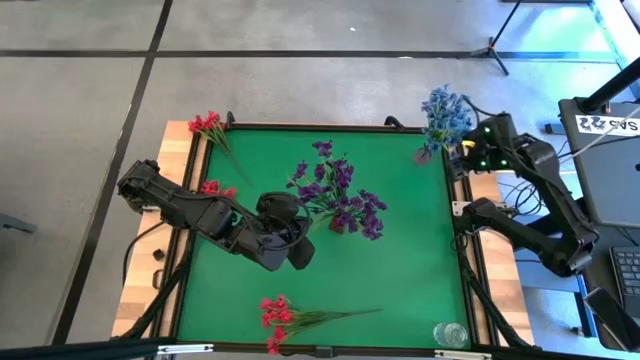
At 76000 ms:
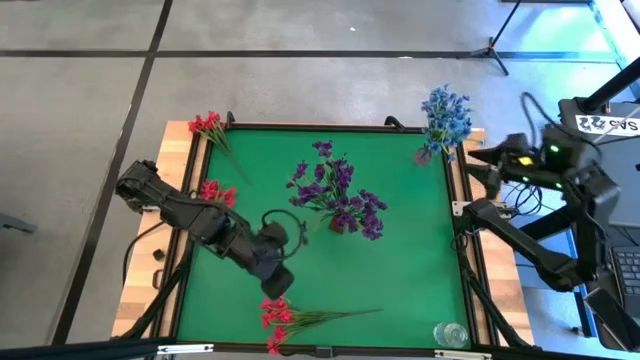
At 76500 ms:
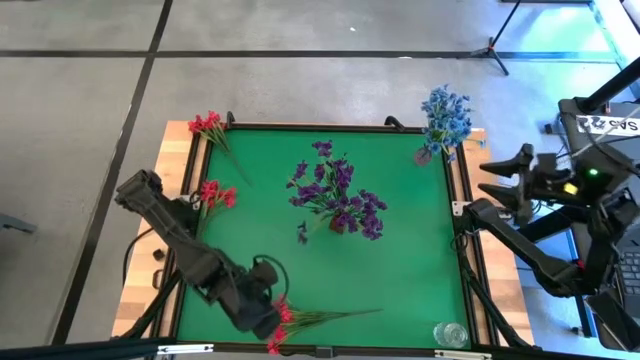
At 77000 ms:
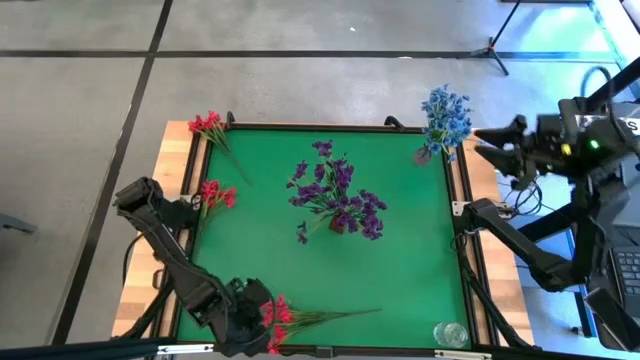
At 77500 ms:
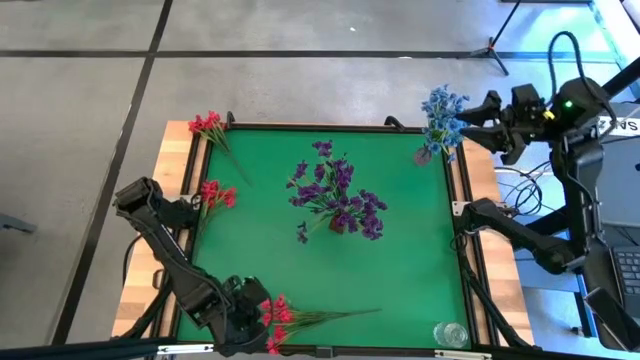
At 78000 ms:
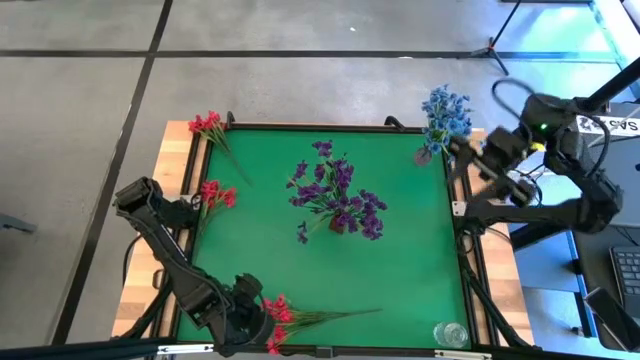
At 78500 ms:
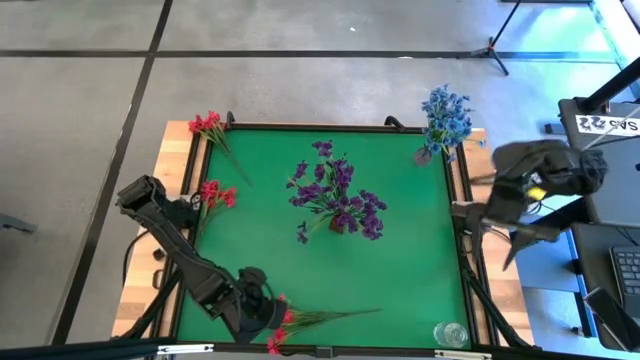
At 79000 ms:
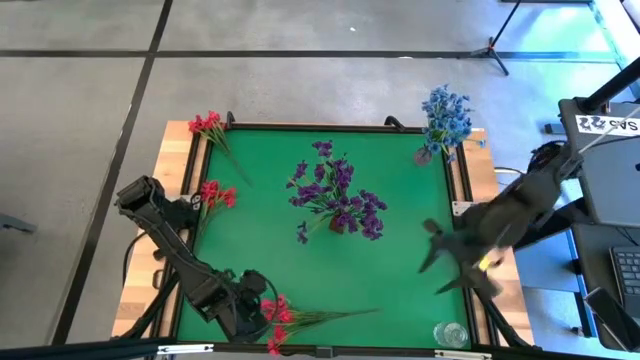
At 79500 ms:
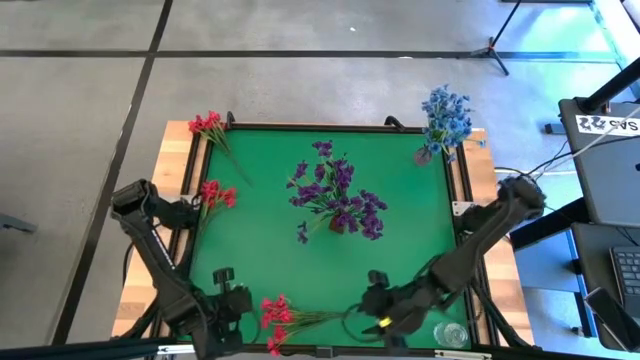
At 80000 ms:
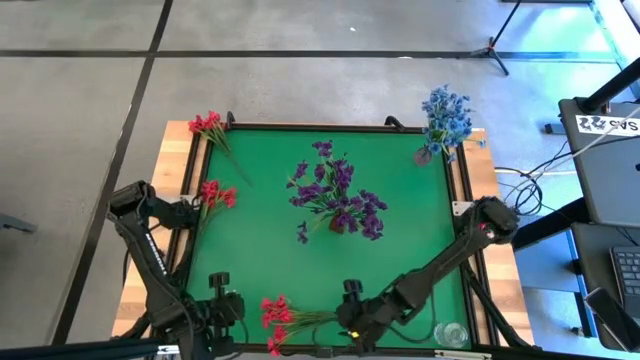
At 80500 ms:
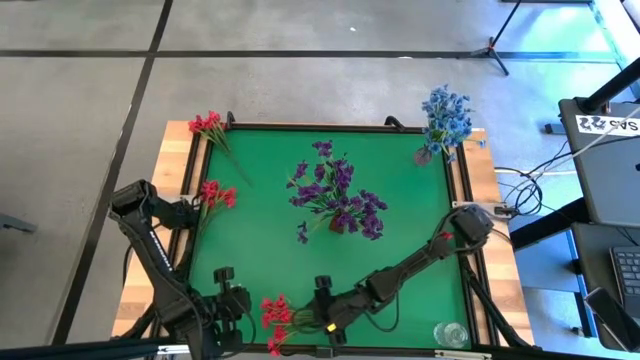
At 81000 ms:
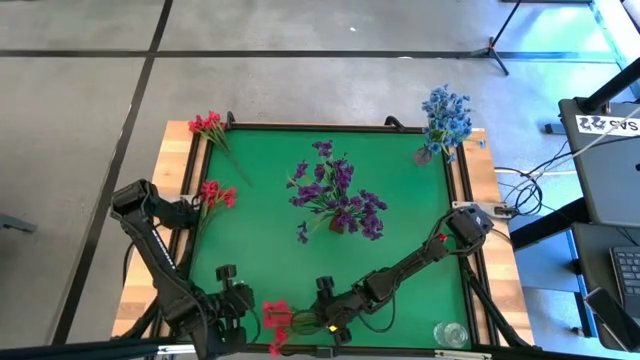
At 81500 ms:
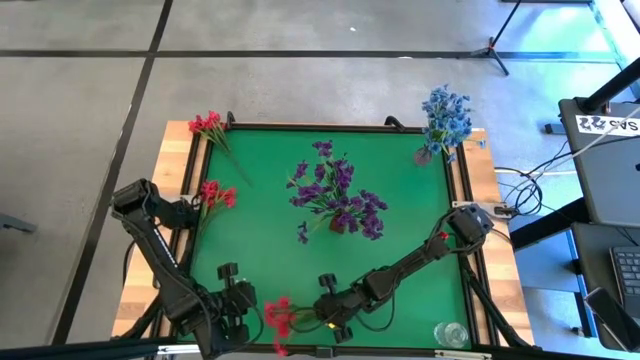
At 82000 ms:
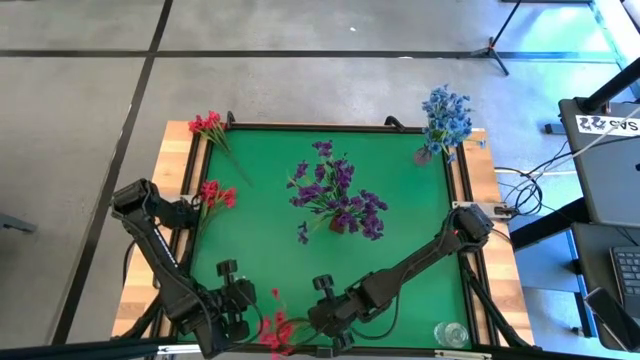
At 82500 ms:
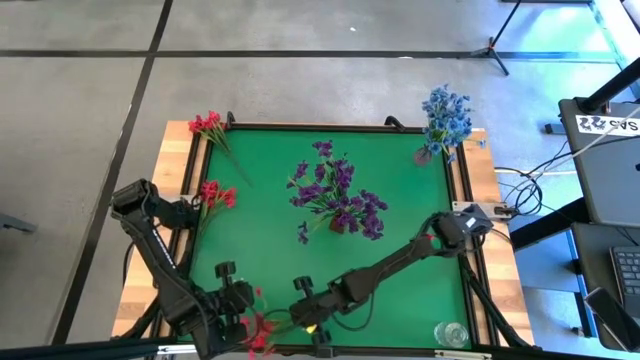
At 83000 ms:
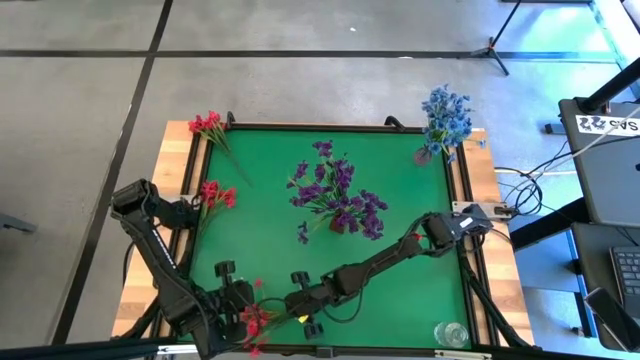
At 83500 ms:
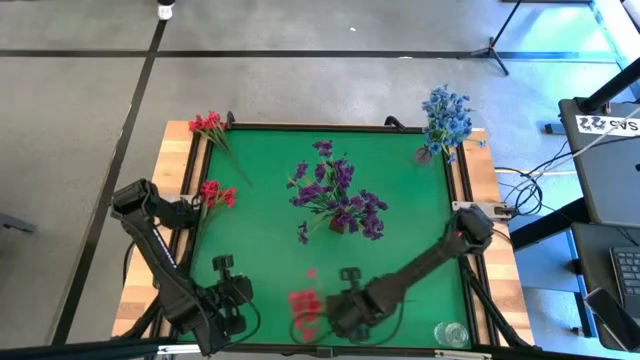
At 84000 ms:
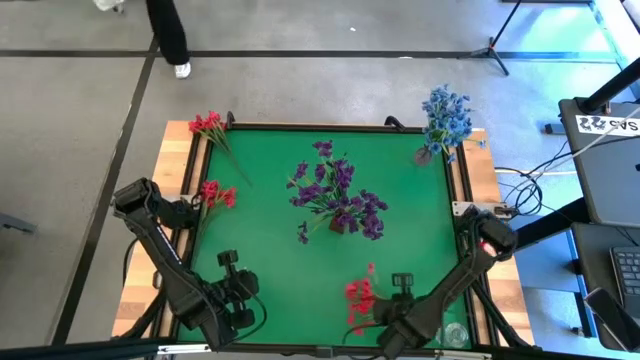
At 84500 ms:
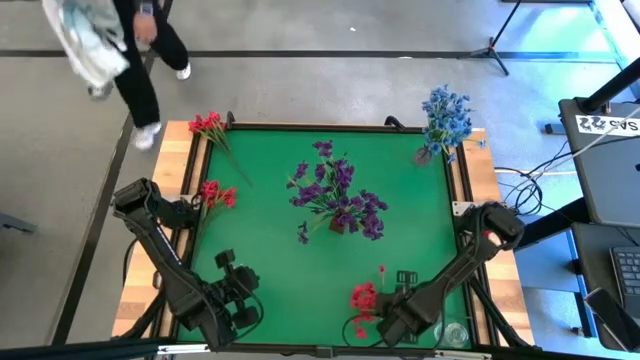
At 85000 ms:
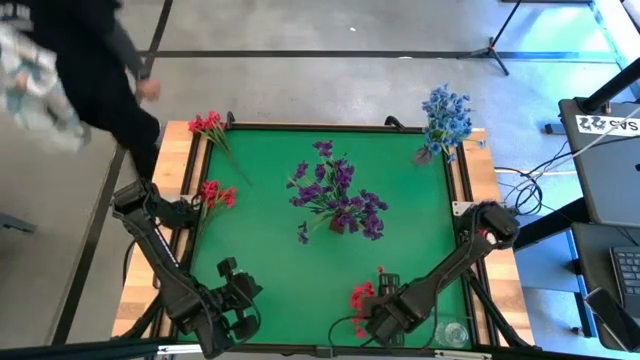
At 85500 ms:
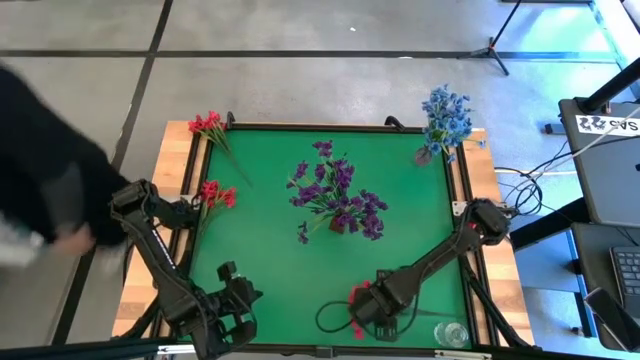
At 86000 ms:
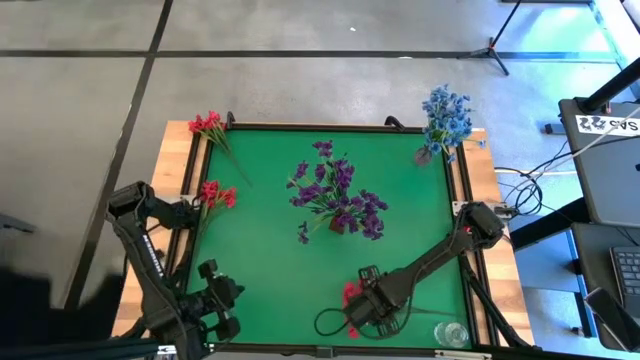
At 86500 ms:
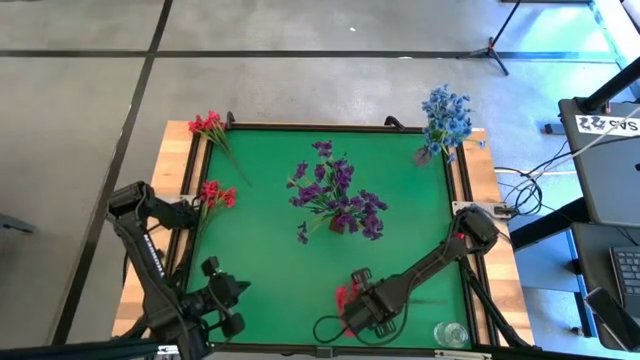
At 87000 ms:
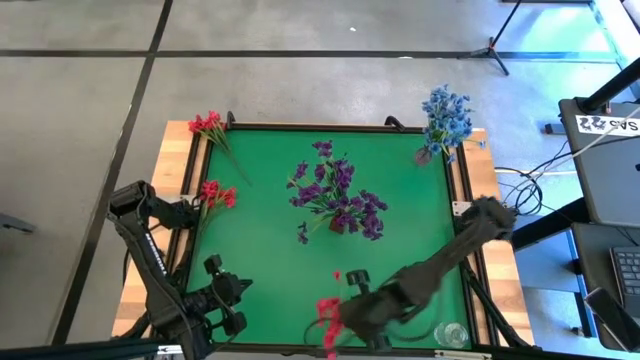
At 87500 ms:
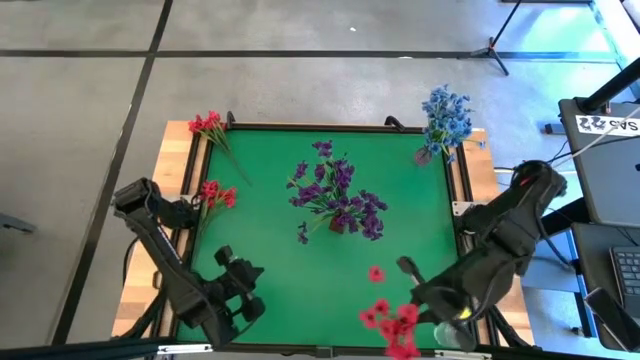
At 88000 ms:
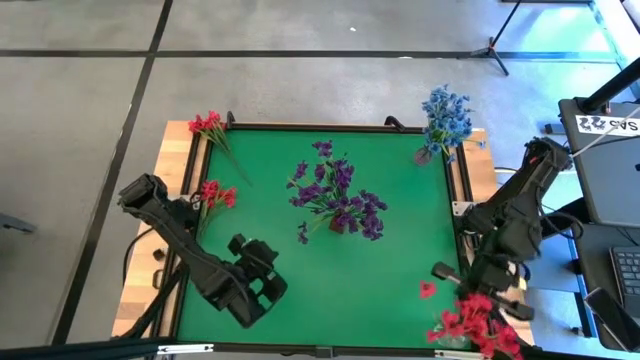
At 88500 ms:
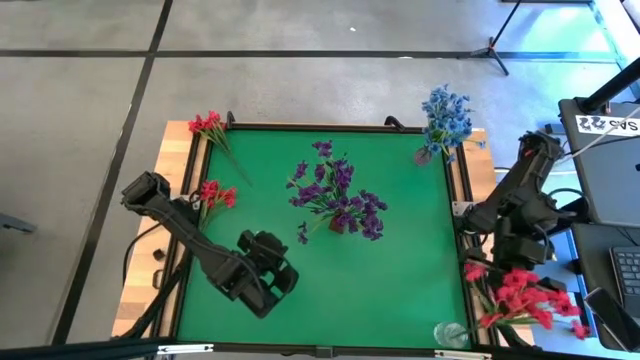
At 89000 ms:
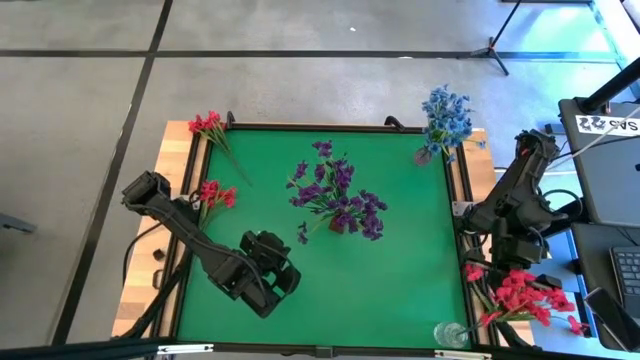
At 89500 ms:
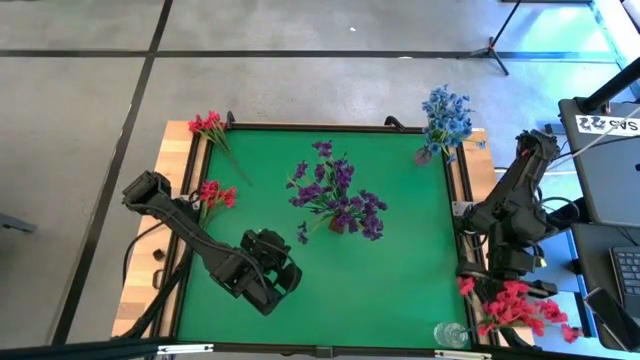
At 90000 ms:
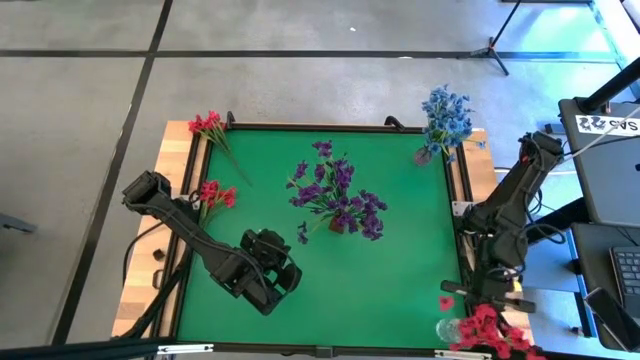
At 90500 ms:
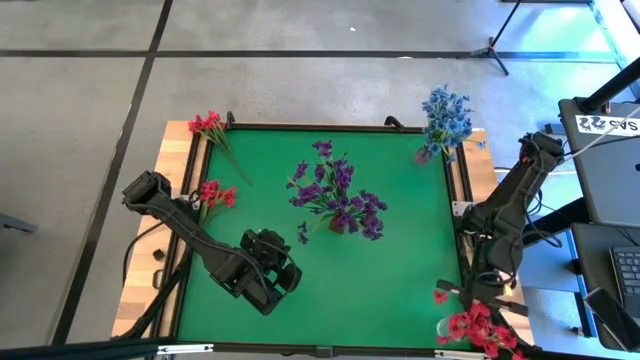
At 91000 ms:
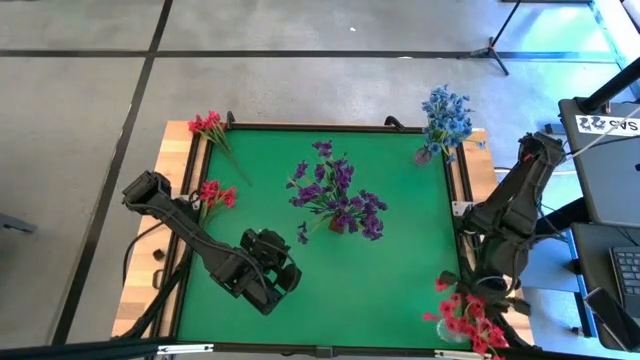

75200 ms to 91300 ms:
Task: Sort flowers into vase by color
Put the bottom red flowers into the transparent vase

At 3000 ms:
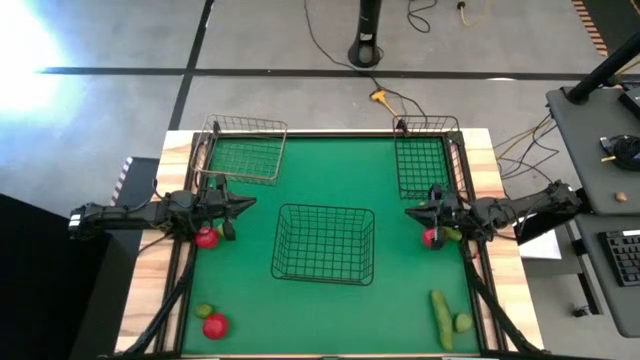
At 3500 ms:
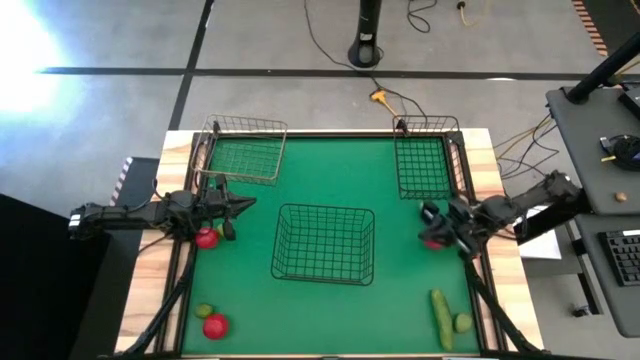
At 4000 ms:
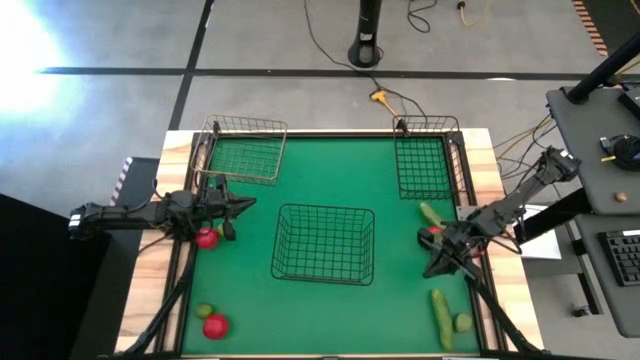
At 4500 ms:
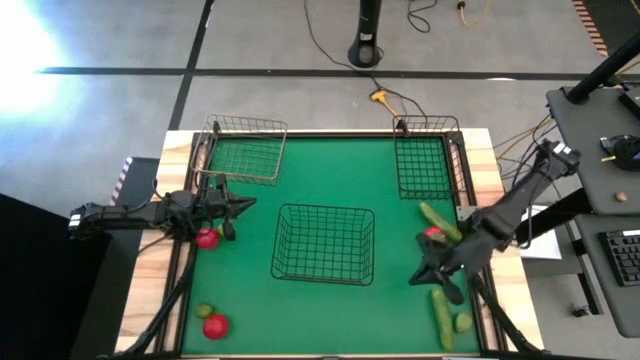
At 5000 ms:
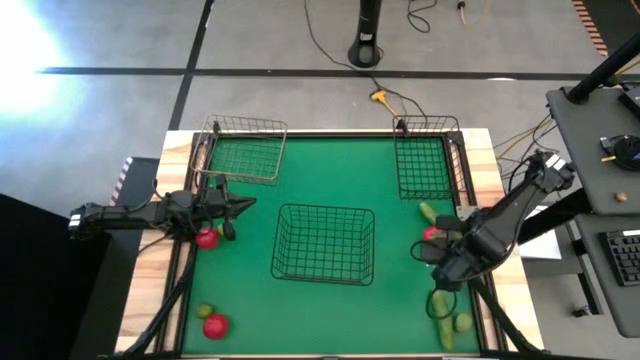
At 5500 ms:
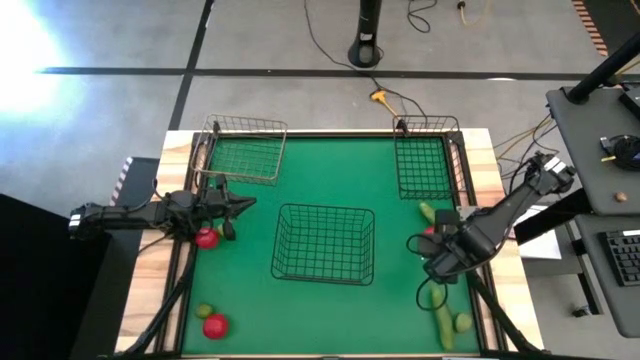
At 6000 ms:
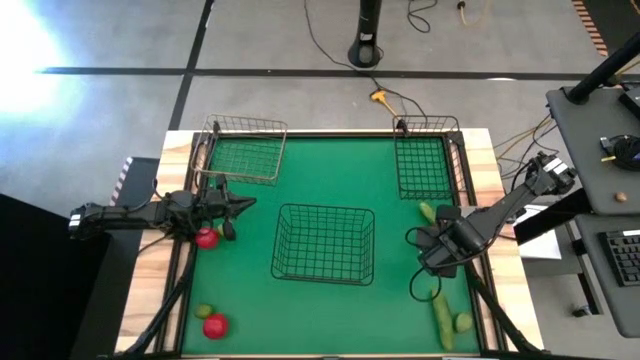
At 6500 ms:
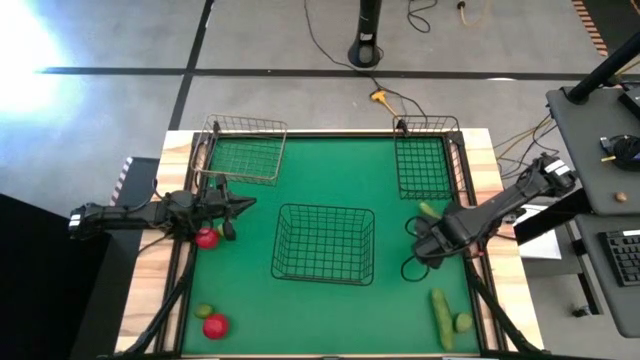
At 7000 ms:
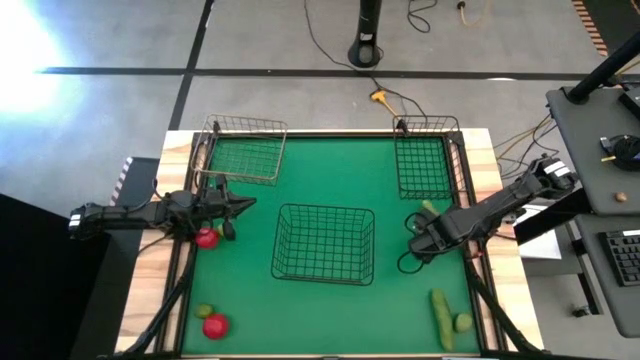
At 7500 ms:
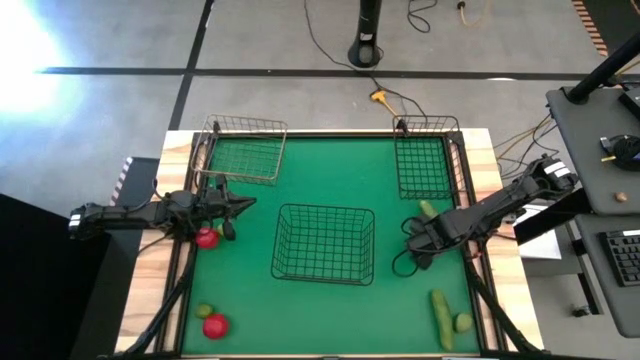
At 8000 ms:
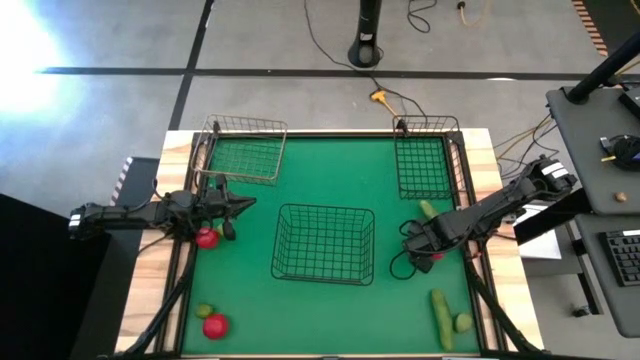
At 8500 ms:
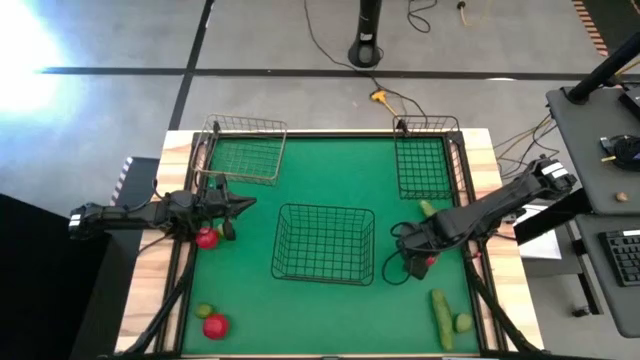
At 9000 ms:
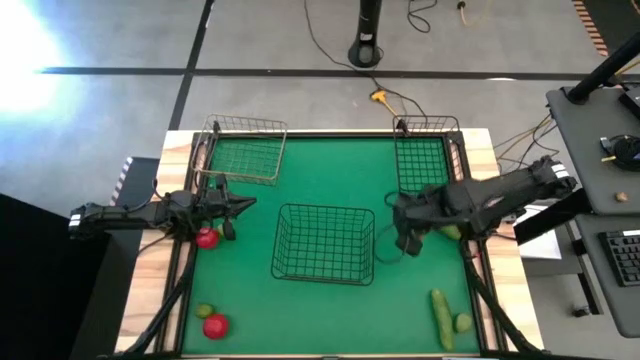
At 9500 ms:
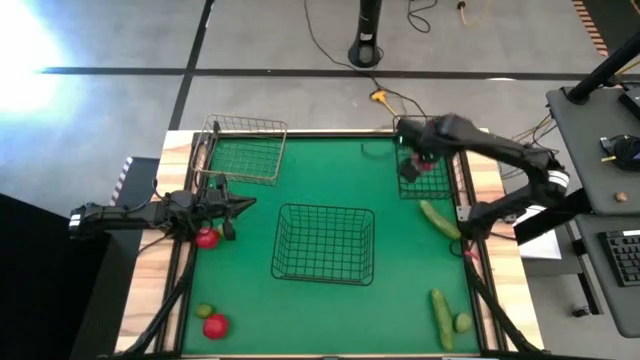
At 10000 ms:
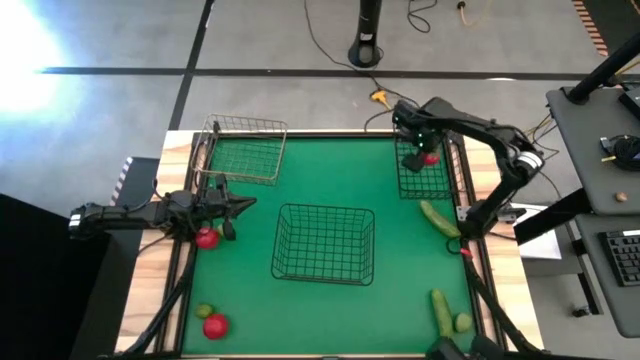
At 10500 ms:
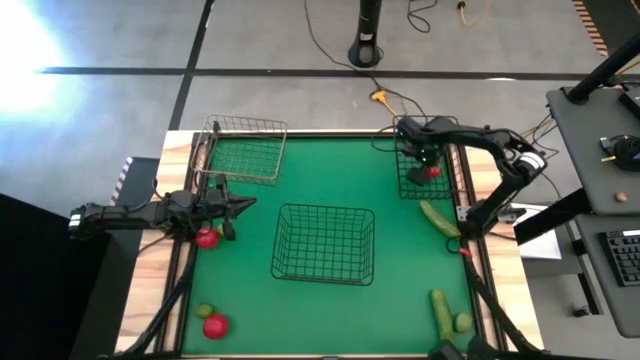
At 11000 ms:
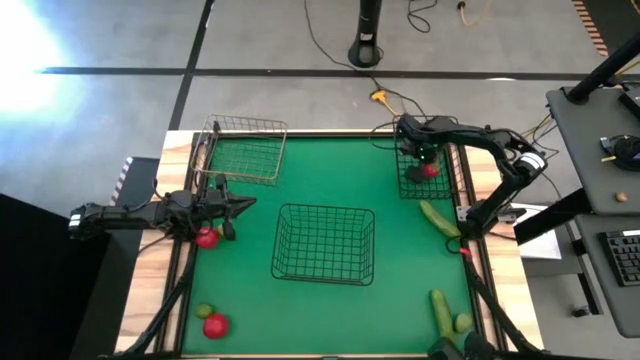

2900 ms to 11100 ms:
Task: Sort produce into baskets
Put the right tomato into the top black wire basket
